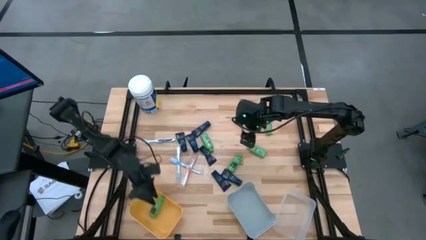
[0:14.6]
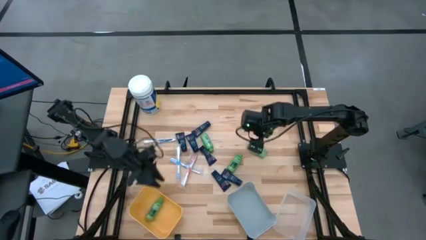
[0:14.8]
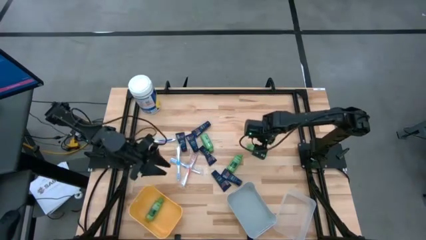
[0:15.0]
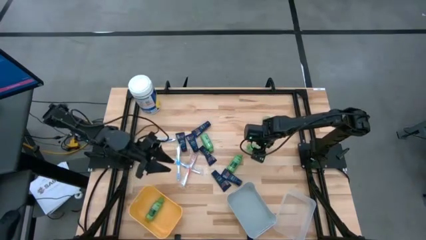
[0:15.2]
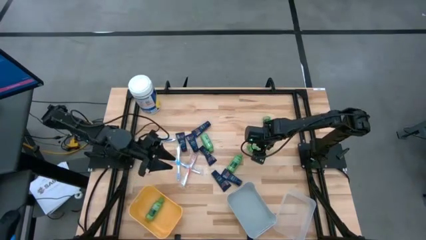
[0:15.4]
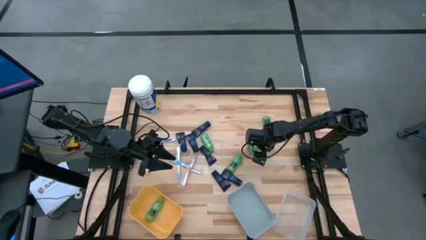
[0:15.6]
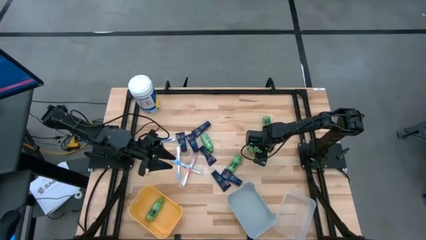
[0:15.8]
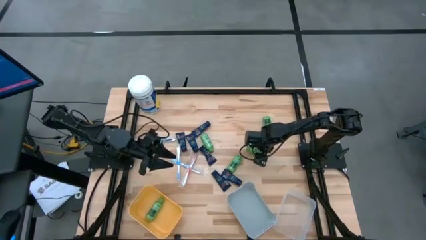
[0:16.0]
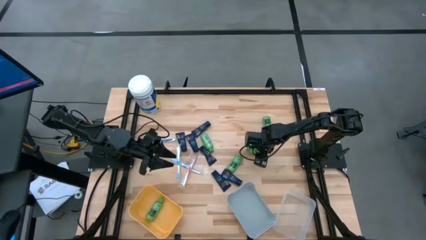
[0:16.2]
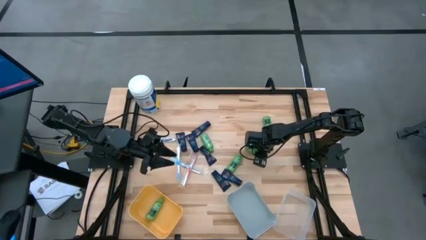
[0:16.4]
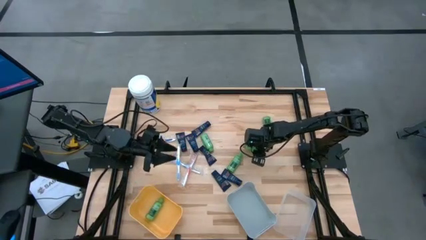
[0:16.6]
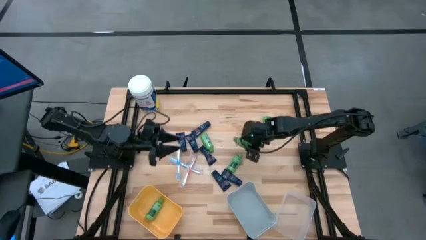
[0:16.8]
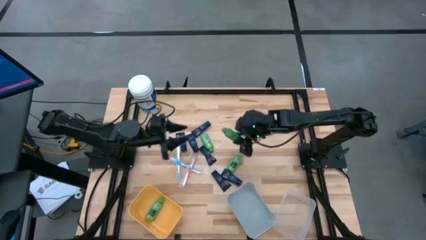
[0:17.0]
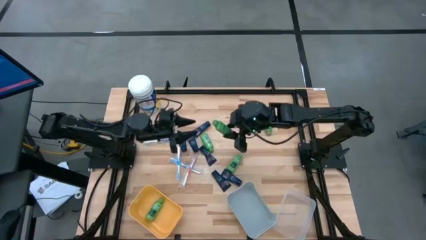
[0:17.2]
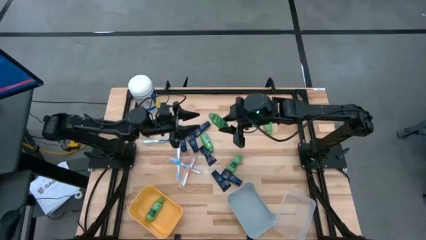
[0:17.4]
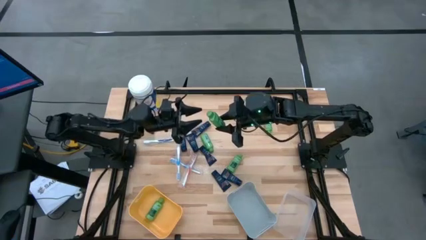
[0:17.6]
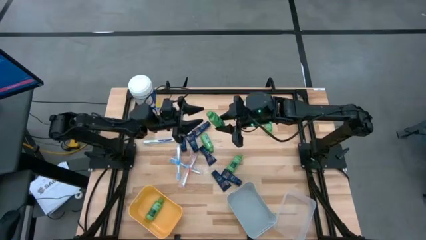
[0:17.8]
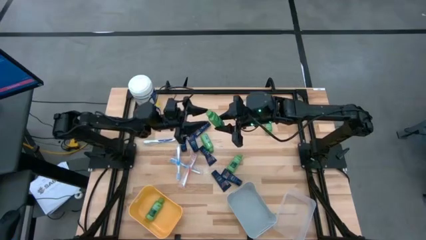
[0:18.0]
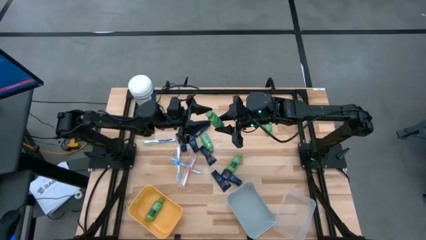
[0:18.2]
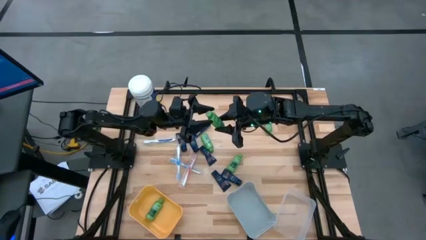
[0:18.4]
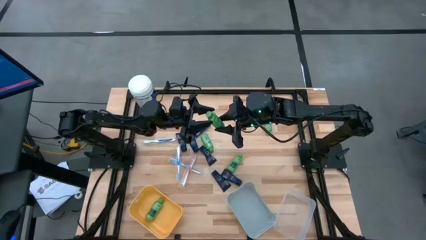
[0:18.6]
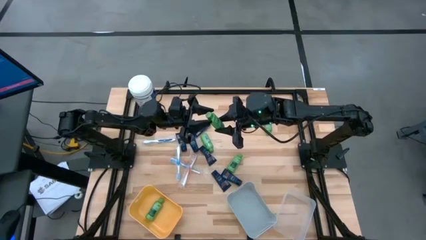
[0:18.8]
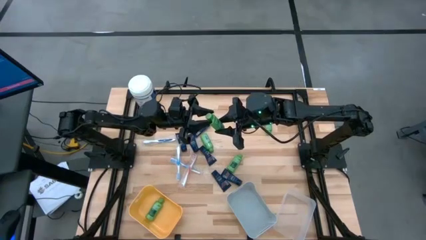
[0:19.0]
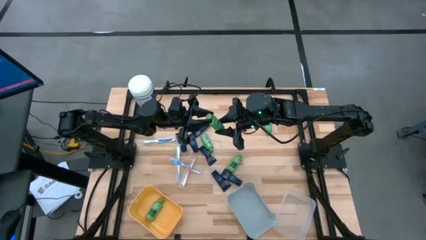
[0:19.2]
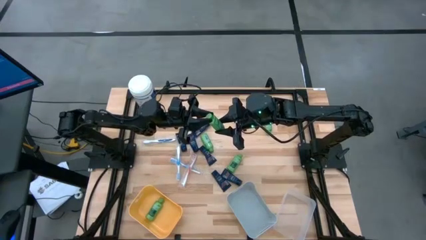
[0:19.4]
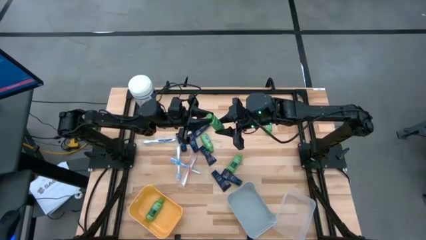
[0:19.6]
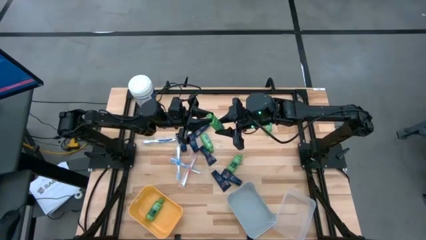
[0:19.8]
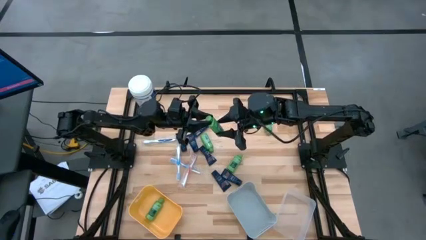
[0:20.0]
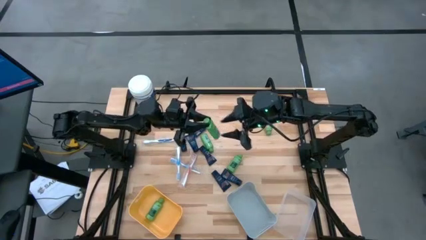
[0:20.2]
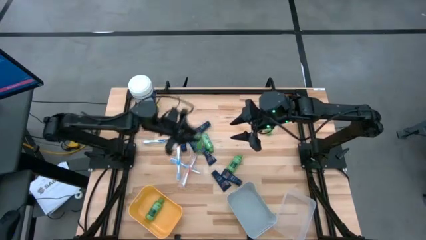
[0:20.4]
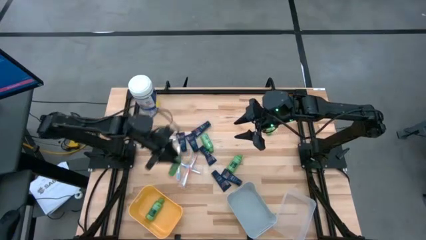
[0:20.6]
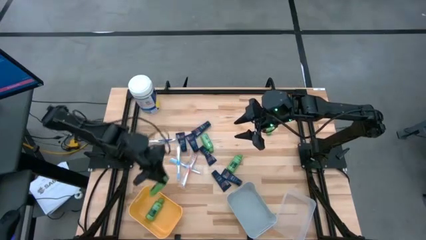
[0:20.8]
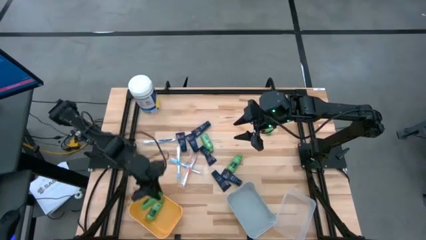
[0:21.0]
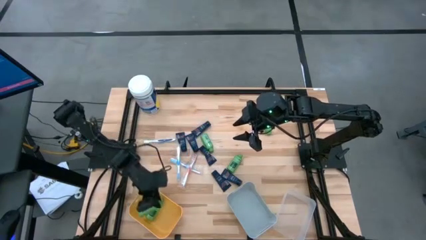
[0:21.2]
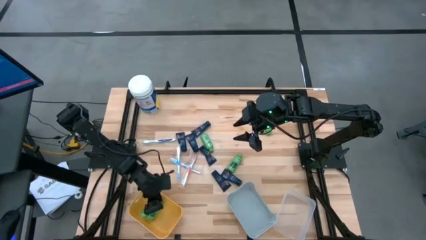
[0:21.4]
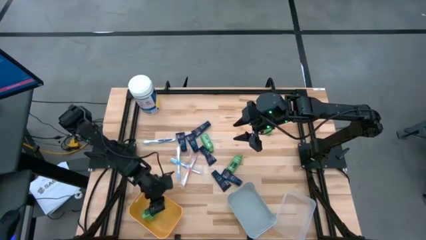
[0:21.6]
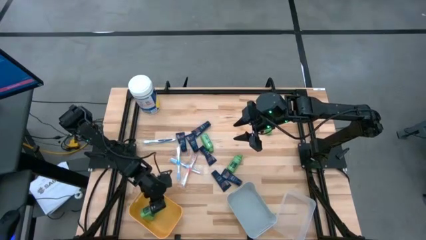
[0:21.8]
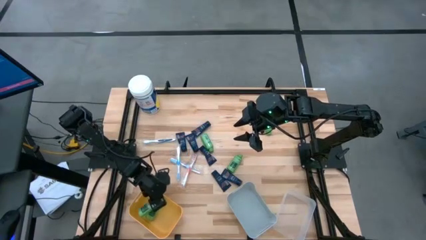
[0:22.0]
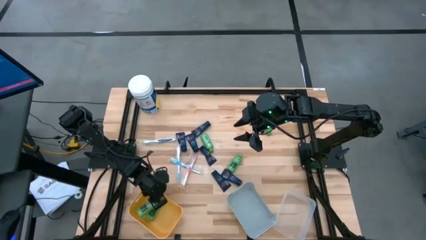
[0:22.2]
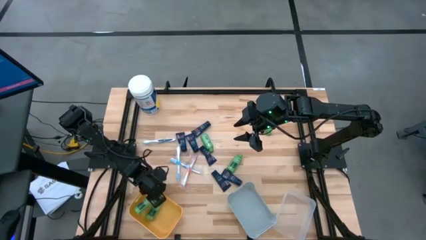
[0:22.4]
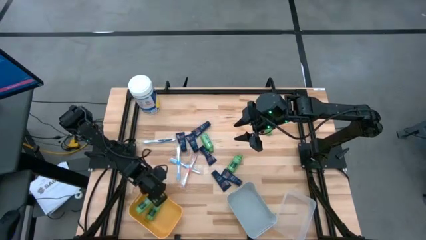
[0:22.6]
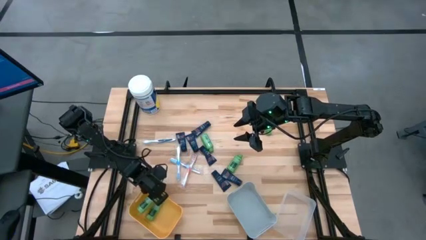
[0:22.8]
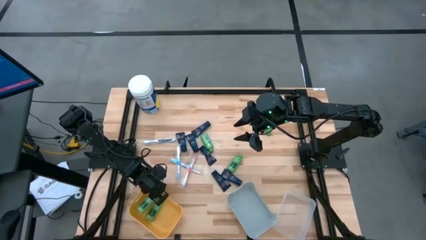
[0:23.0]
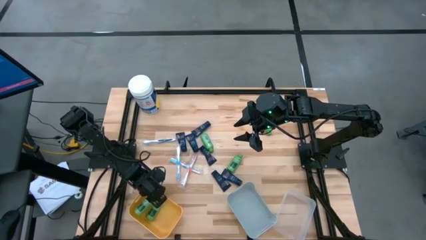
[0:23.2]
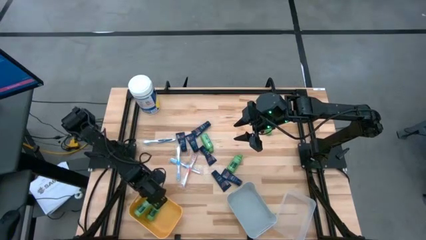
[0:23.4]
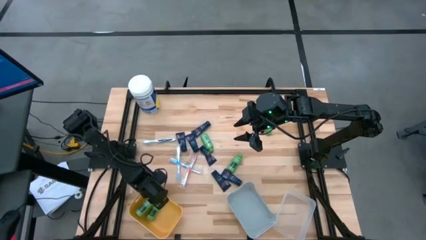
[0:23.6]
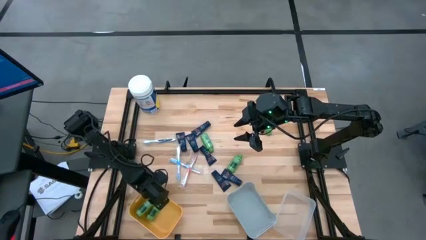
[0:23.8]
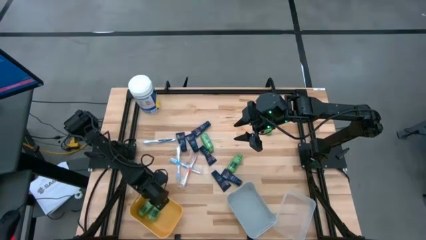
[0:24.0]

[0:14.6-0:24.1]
Task: Pick & Place Travel size toiletries
Put the green shampoo into the yellow bin

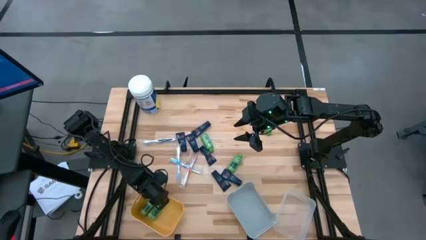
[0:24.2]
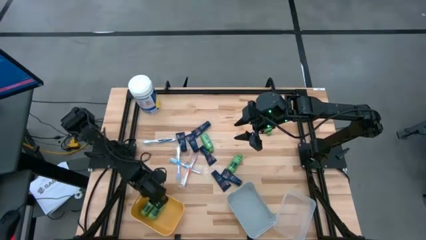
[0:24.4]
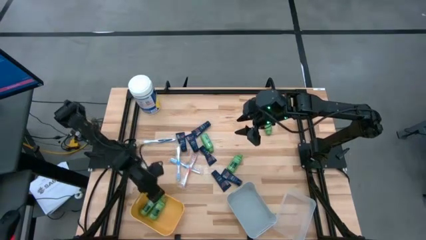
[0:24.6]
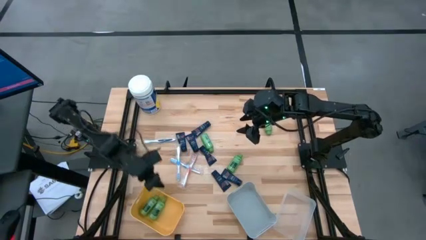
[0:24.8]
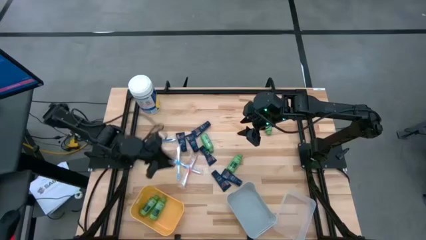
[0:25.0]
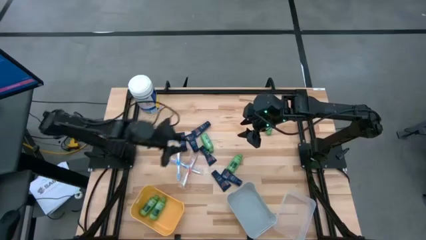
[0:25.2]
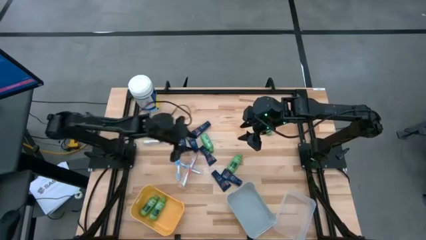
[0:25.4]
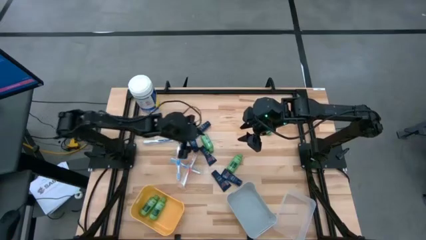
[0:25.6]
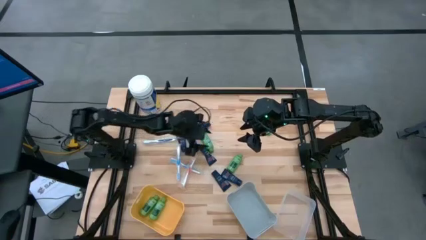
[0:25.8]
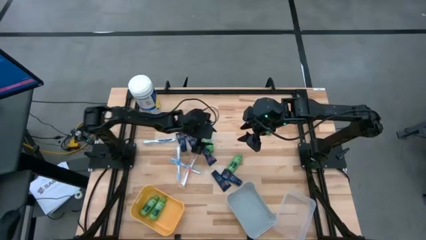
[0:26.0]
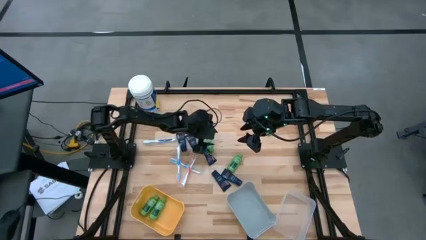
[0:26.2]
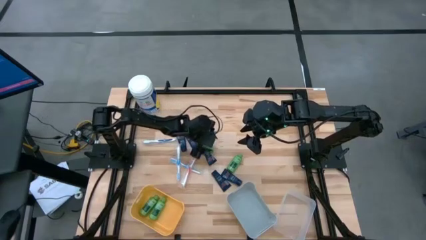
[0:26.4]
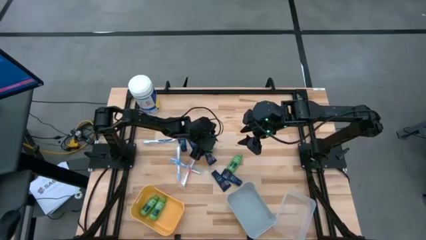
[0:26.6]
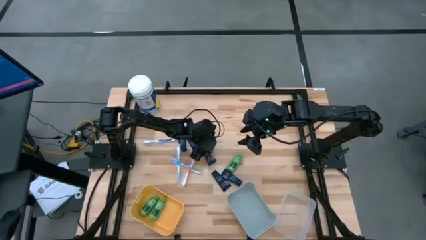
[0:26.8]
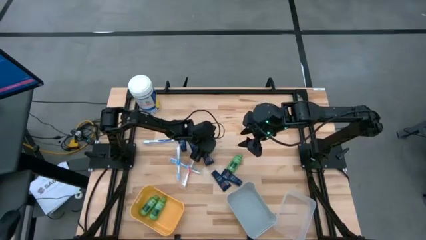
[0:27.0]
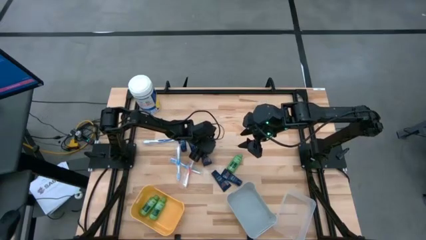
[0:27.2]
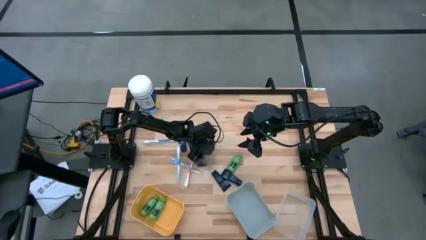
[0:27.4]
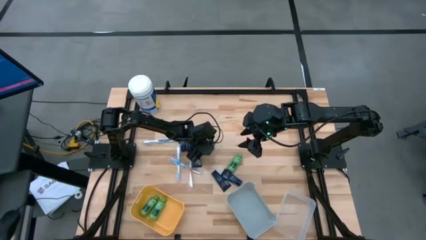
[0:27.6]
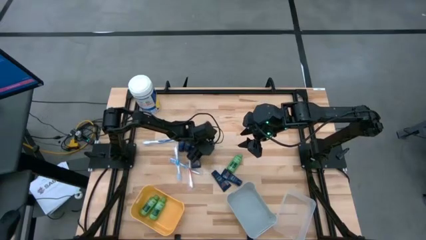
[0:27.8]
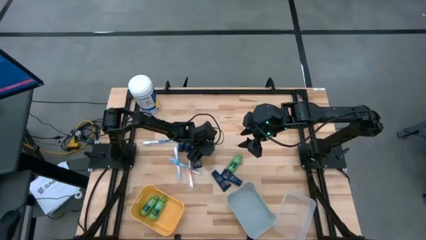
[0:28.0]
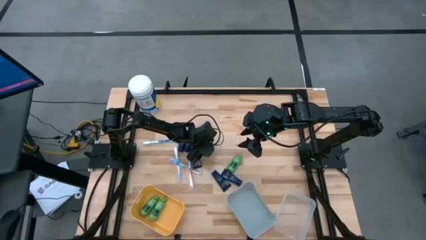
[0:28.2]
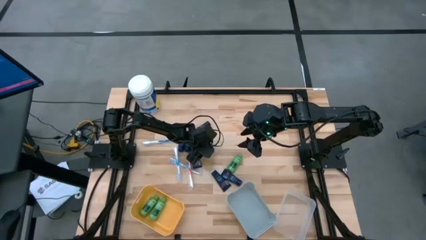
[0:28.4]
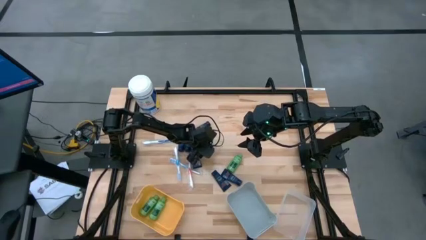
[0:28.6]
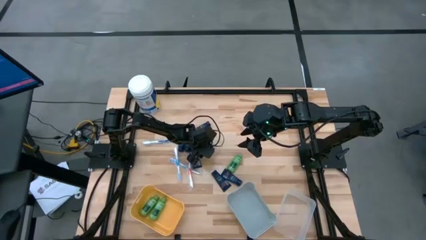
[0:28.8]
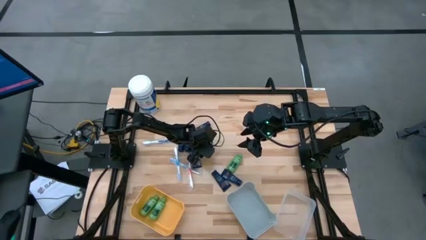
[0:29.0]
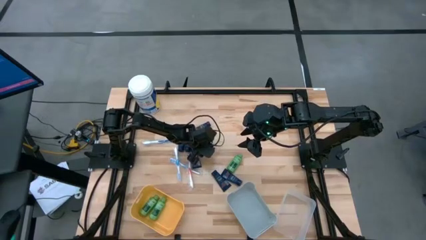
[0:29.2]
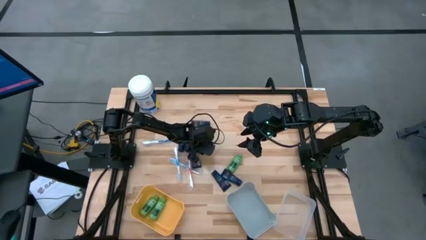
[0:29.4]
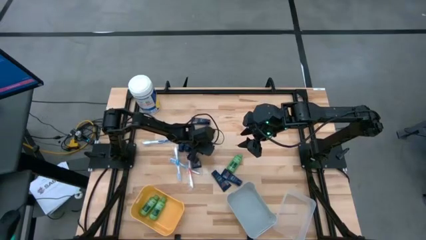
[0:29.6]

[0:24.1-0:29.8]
Put the green shampoo into the yellow bin

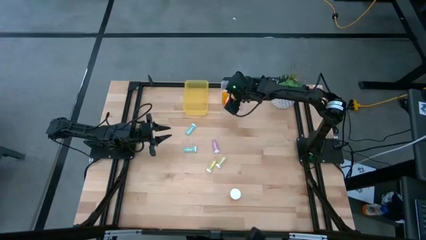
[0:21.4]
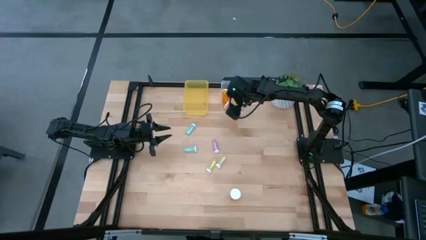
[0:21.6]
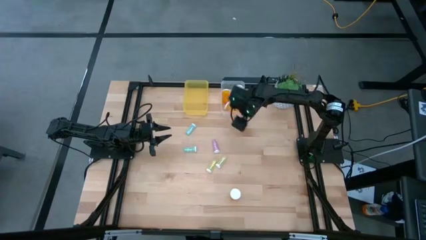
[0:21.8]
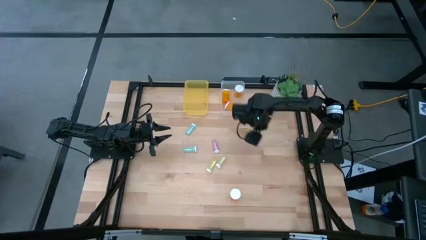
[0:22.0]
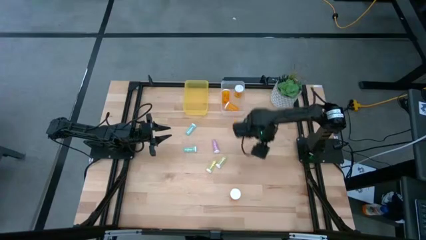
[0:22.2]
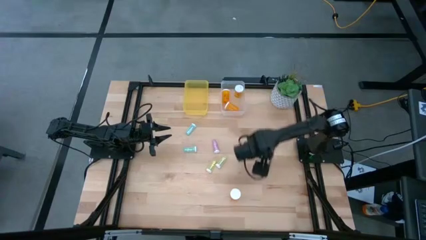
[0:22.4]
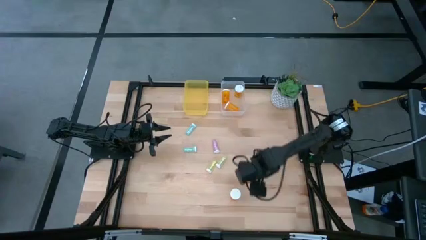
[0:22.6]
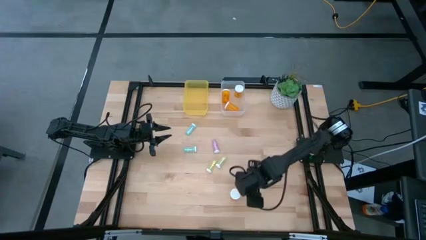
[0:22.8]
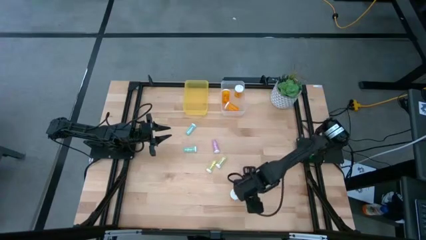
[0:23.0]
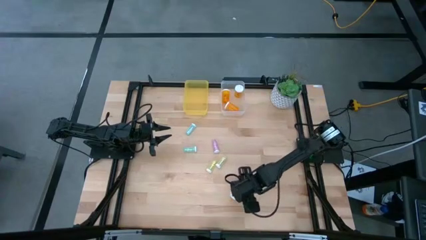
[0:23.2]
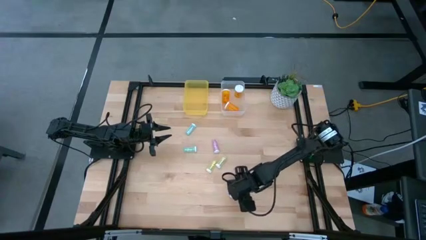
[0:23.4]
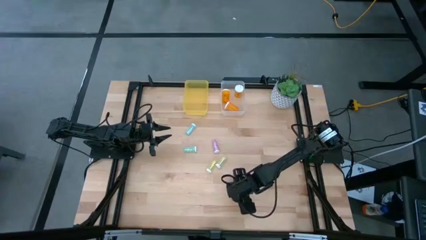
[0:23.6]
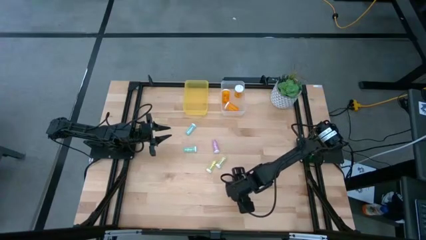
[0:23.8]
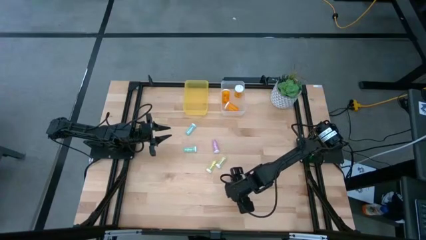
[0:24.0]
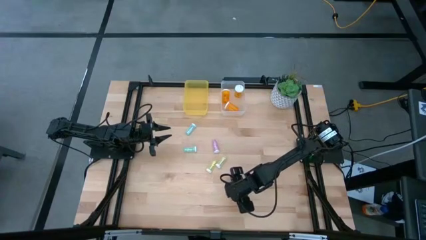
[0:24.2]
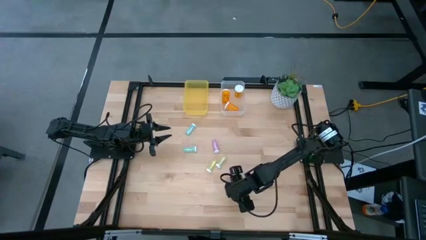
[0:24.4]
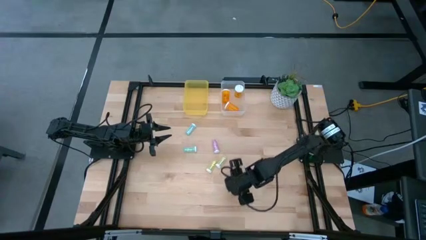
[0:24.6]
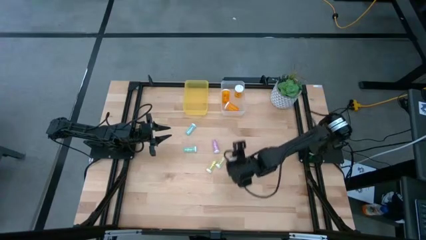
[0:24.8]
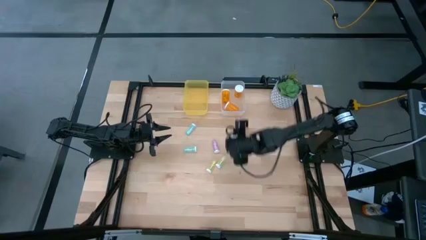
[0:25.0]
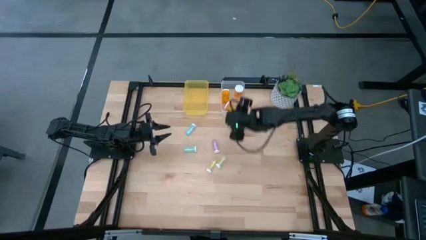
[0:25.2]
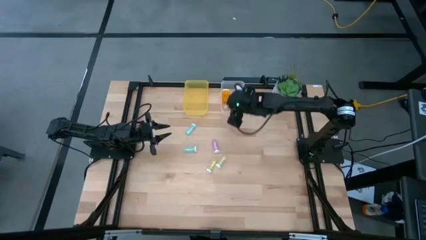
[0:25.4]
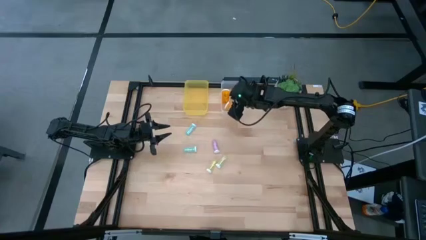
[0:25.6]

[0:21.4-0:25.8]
Task: Pick and place medicine bottles into bin by pill shape (circle, oval)
Put the orange capsule bottle into the transparent bin
